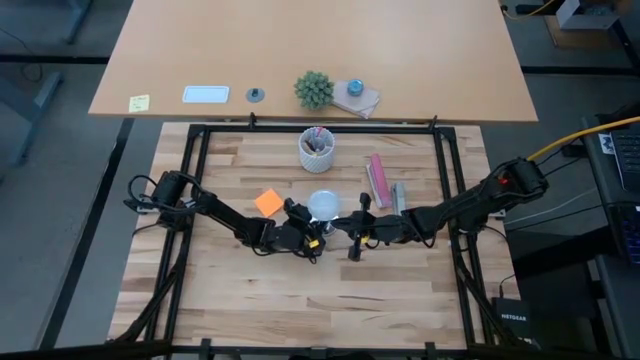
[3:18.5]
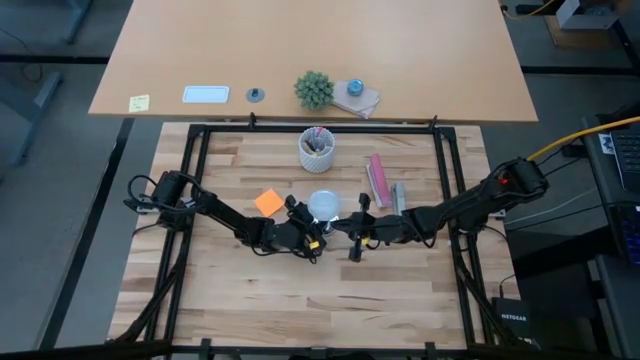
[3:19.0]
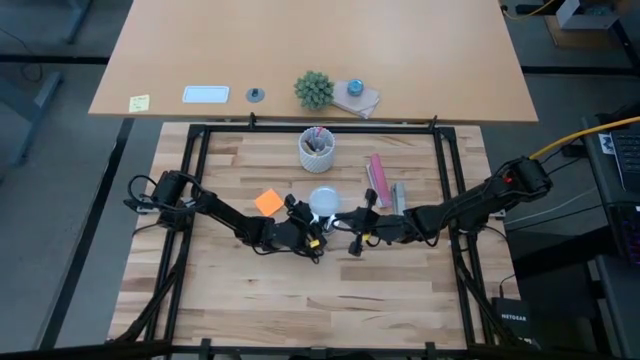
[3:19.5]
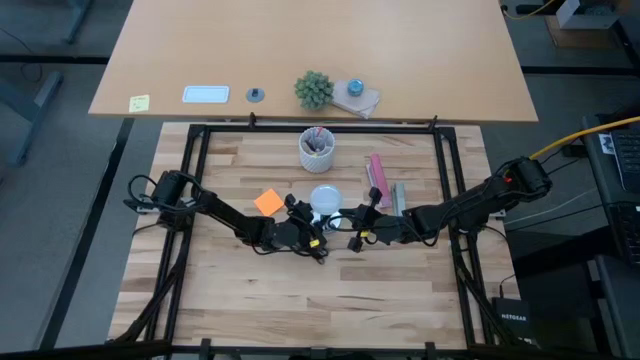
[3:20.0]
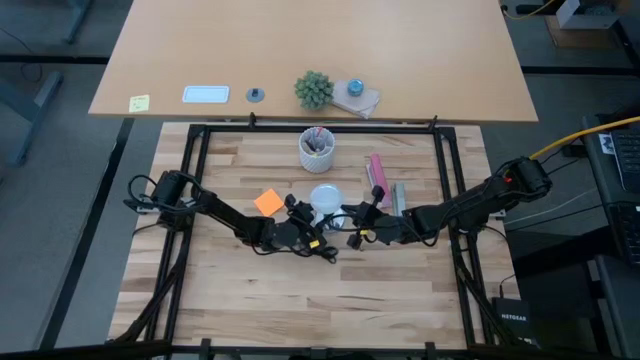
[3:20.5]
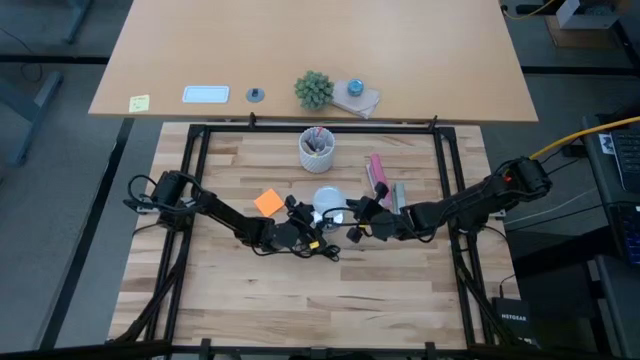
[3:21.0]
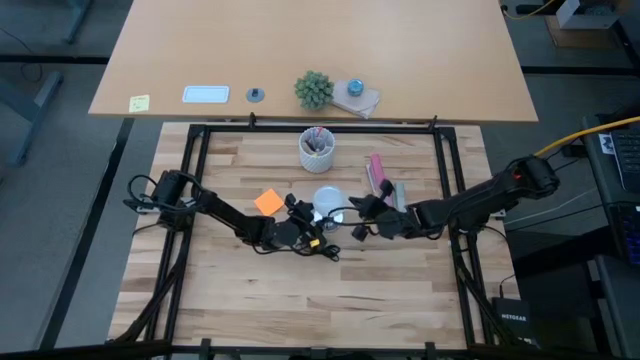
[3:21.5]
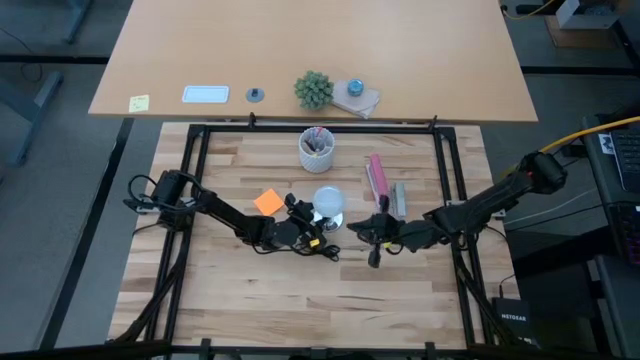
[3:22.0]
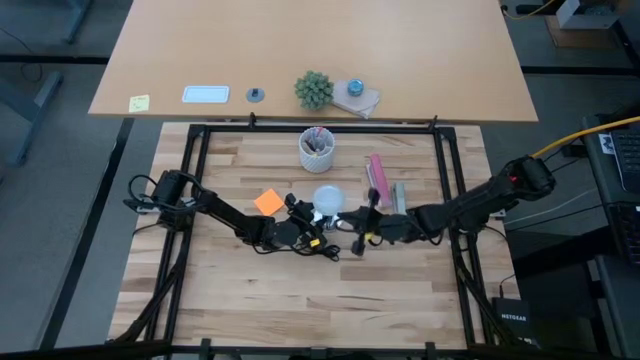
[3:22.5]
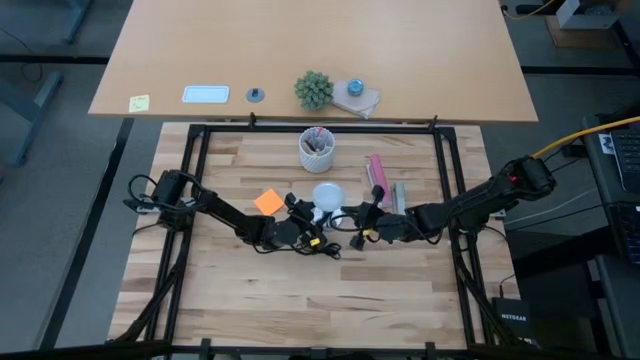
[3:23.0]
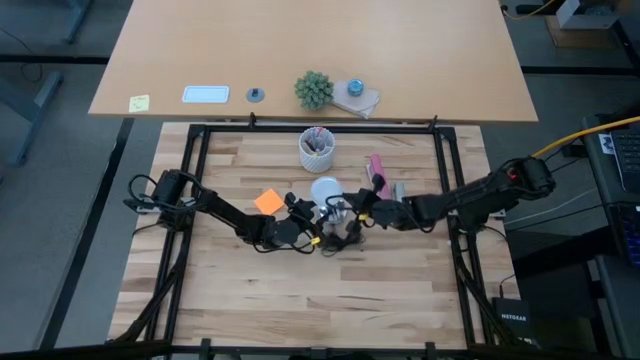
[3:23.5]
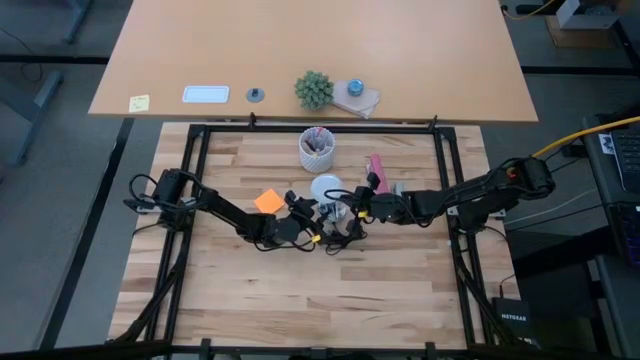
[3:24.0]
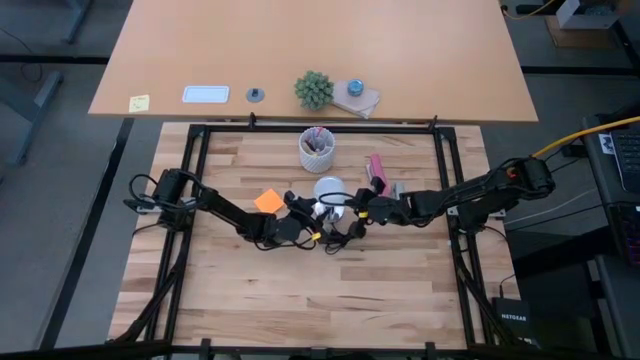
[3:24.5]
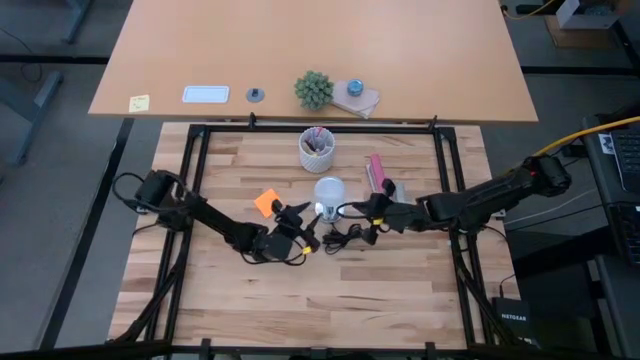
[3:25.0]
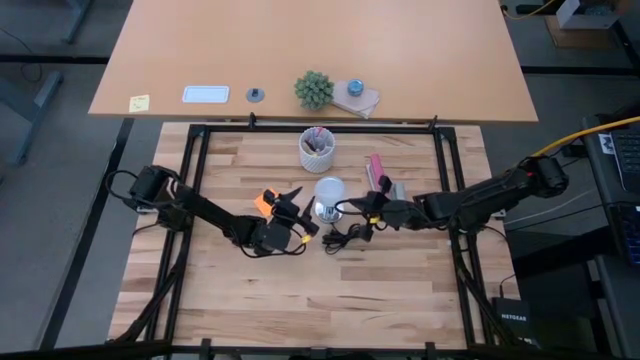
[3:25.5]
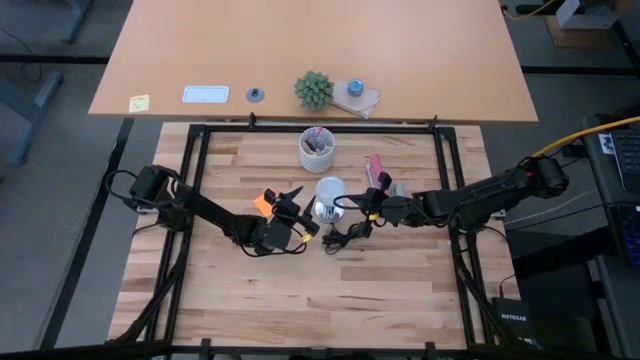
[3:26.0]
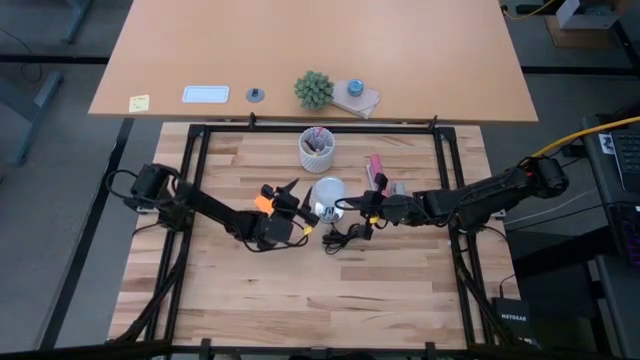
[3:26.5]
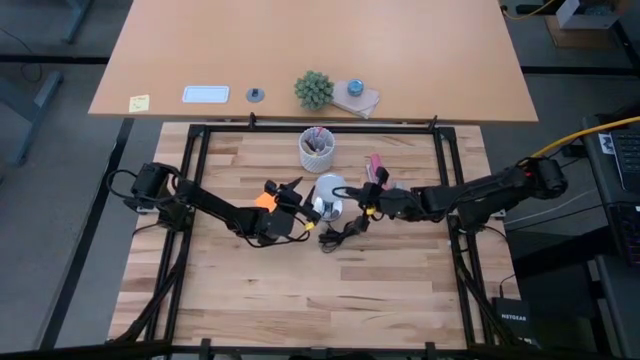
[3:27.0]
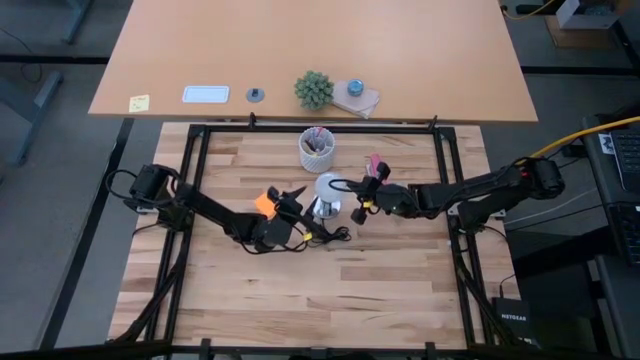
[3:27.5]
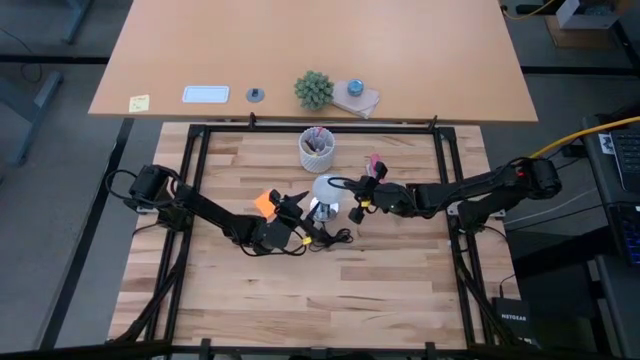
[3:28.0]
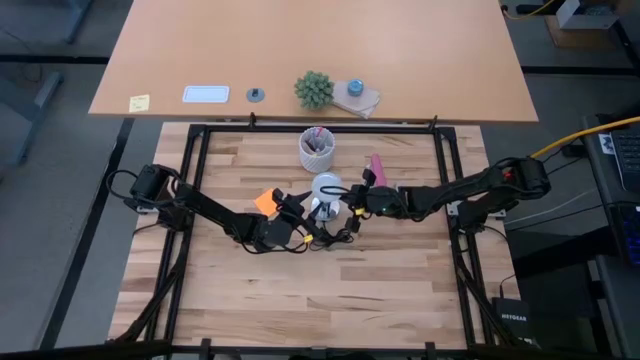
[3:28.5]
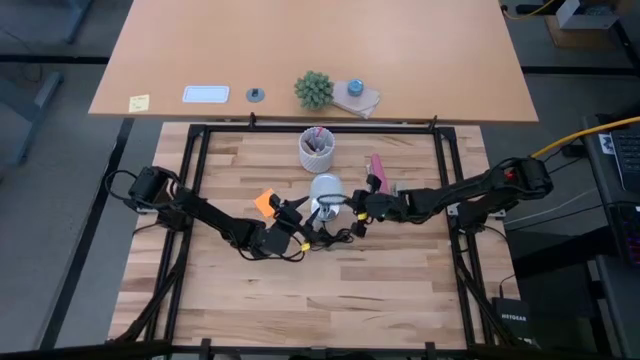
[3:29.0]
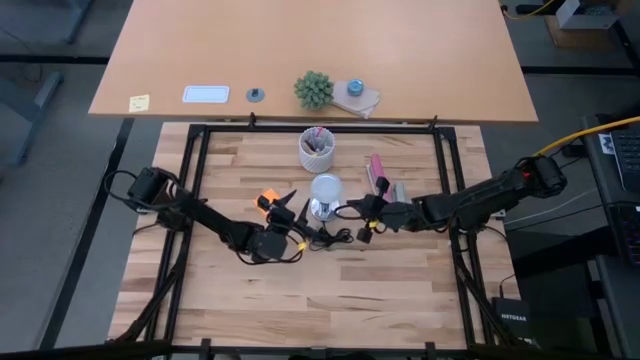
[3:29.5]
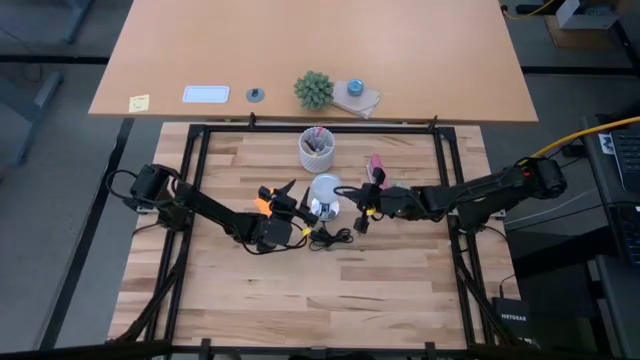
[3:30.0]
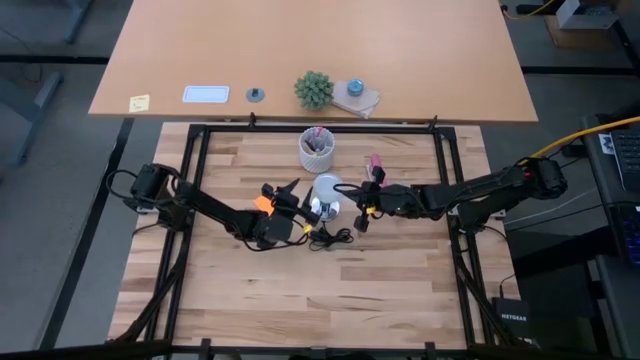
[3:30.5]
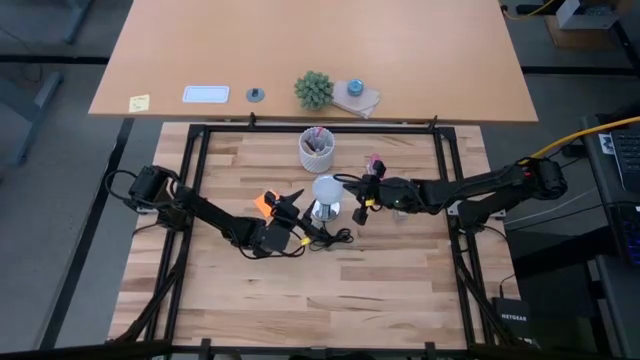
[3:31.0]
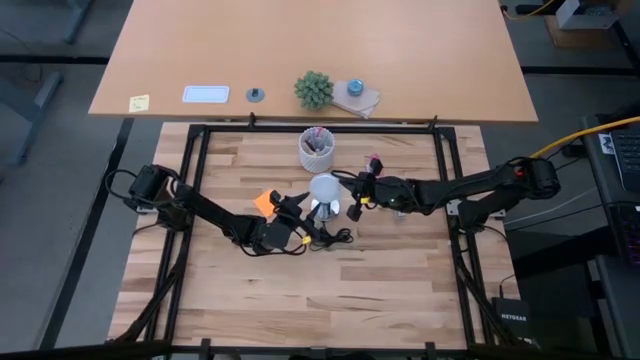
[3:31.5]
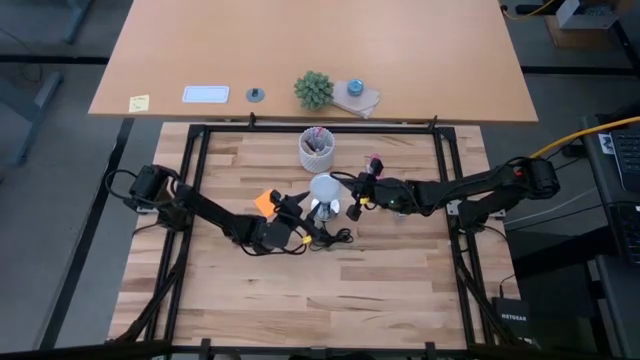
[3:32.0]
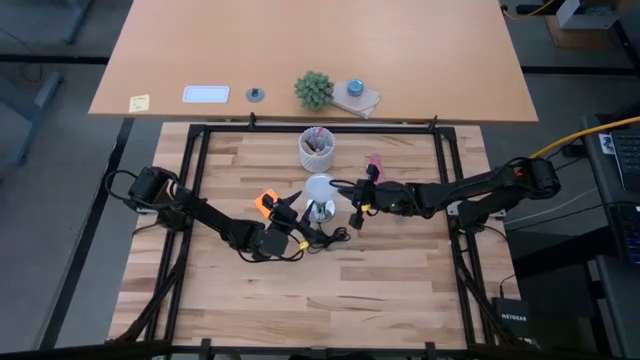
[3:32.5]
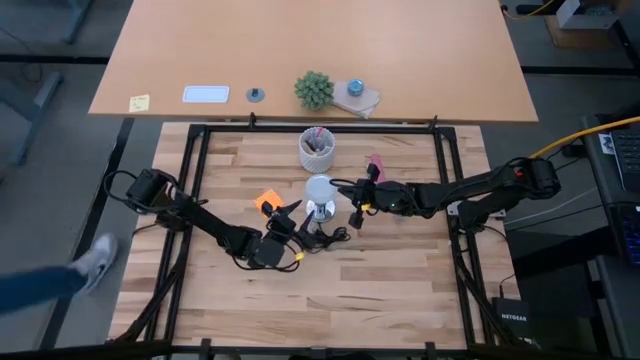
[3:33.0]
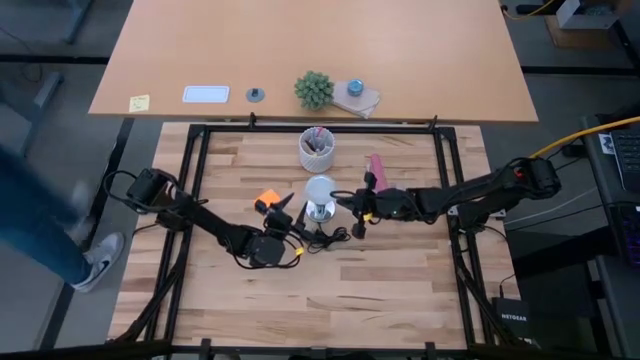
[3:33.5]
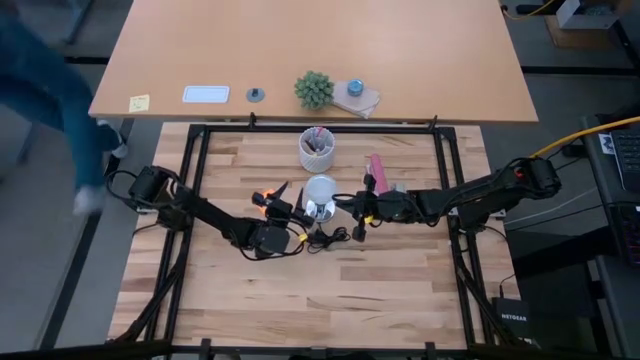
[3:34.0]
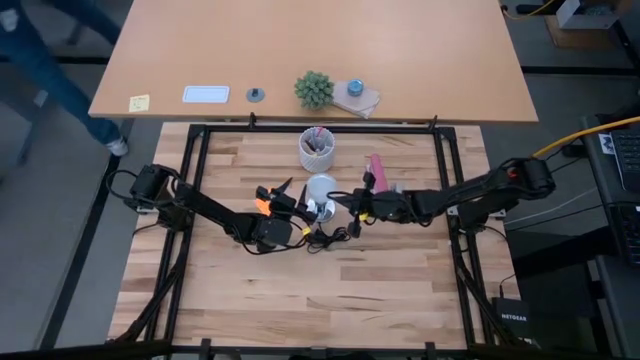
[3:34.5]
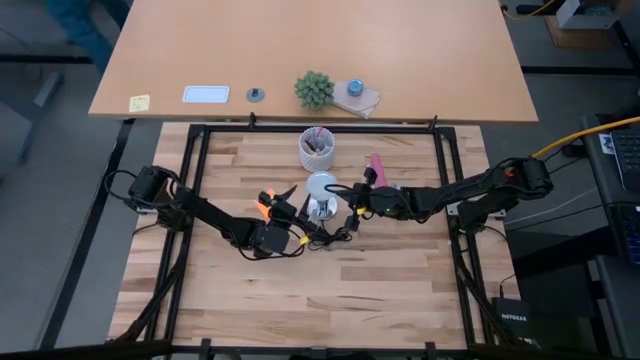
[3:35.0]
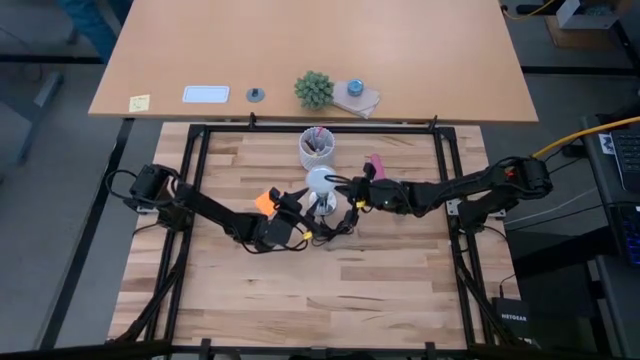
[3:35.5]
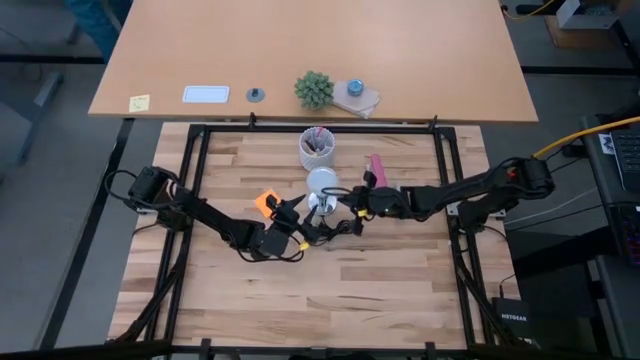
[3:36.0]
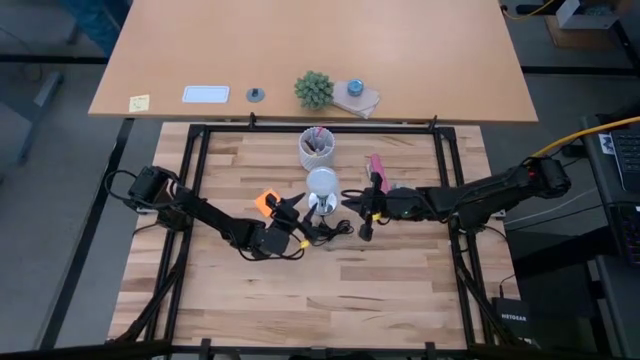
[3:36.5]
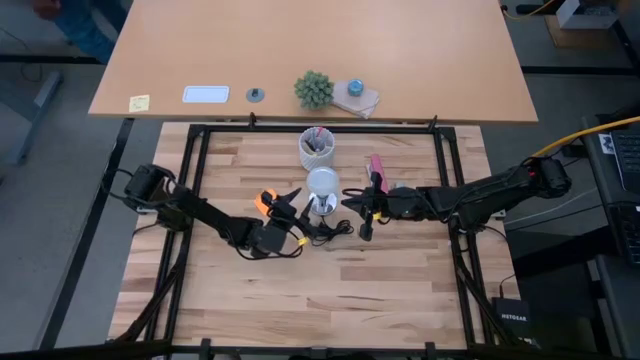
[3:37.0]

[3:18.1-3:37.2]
Task: Screw lightbulb
Remove the lightbulb from the lamp
